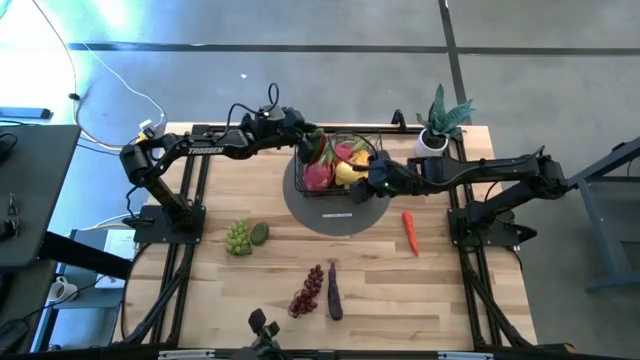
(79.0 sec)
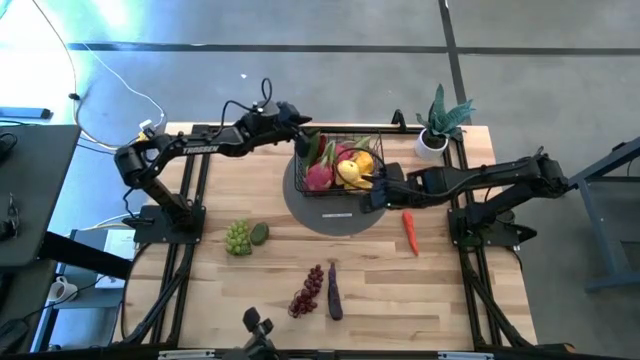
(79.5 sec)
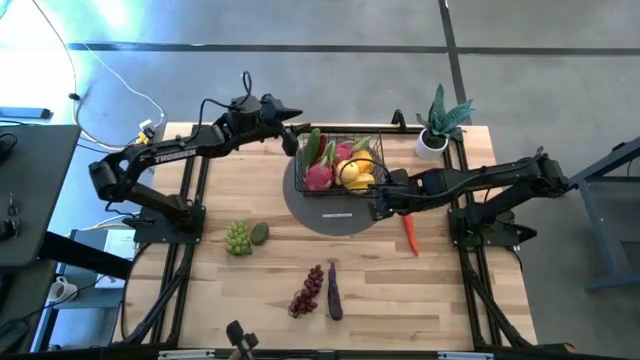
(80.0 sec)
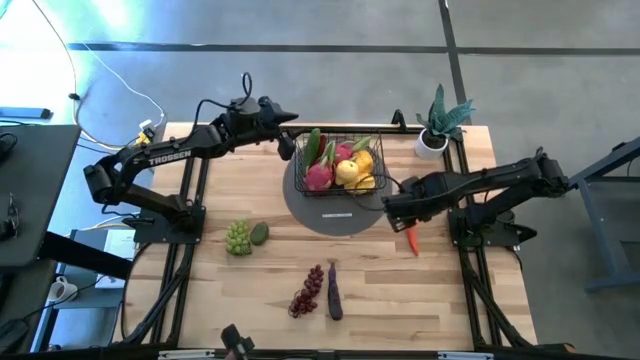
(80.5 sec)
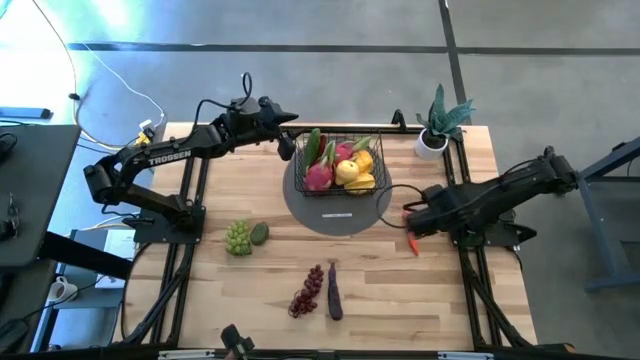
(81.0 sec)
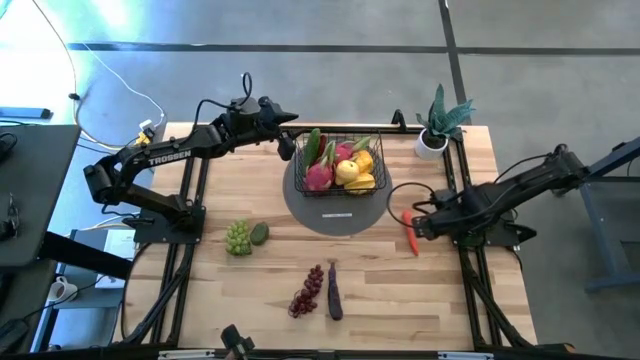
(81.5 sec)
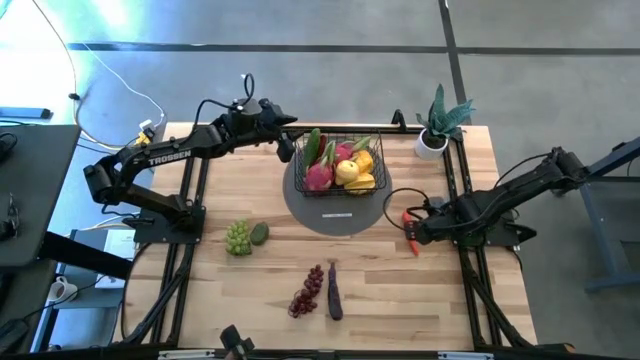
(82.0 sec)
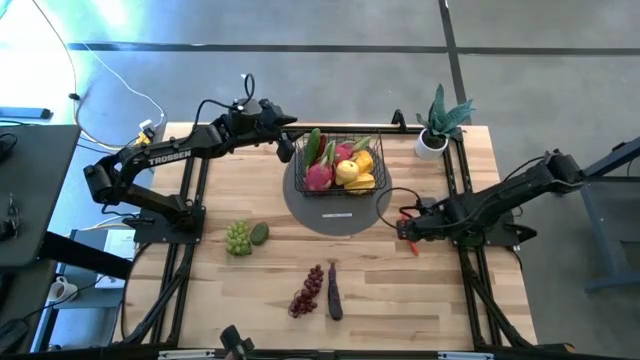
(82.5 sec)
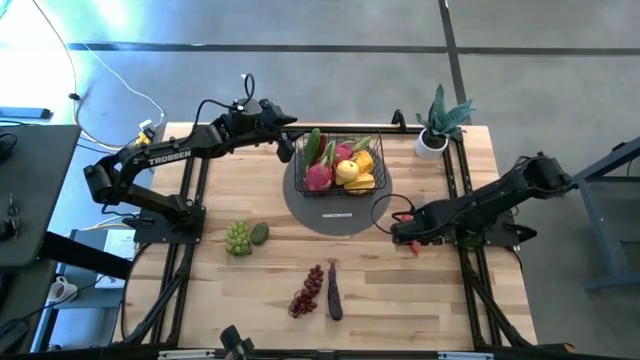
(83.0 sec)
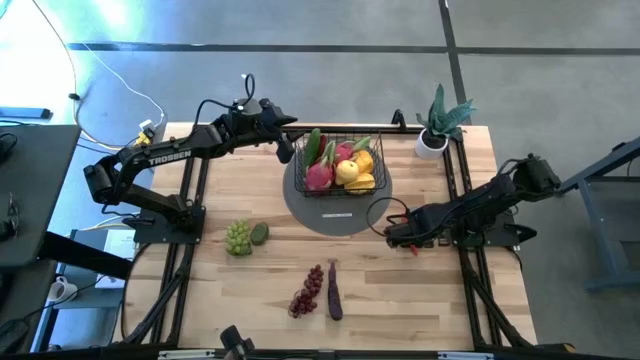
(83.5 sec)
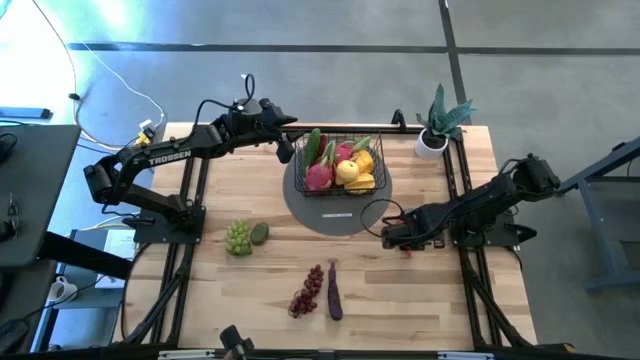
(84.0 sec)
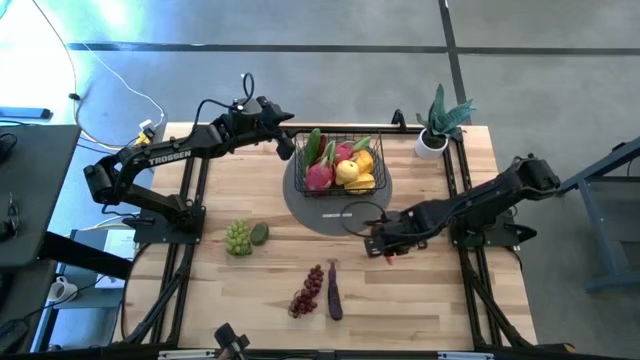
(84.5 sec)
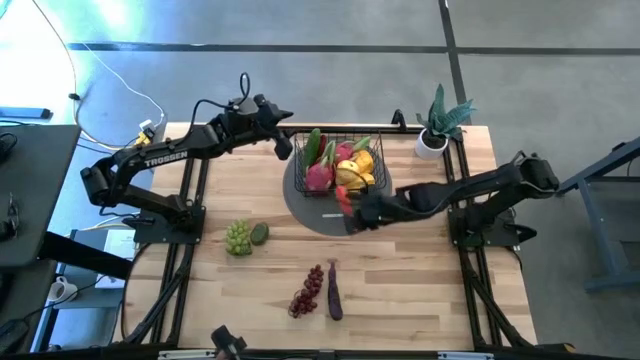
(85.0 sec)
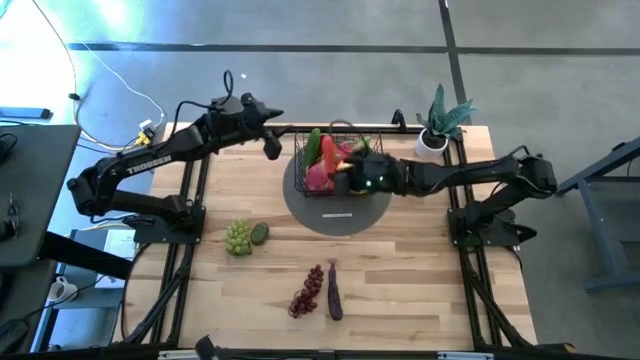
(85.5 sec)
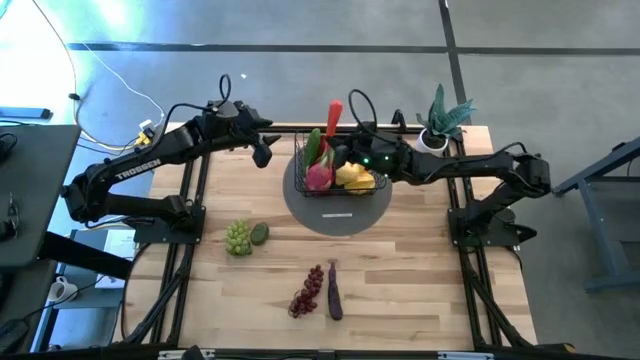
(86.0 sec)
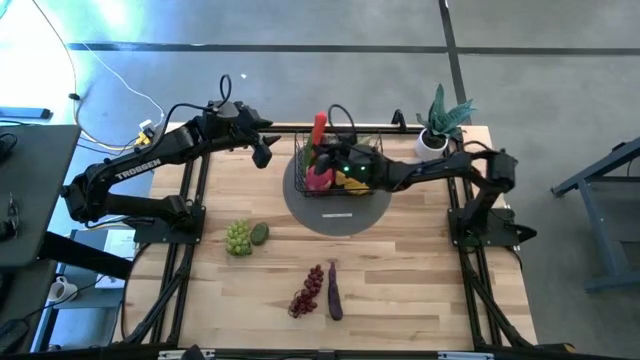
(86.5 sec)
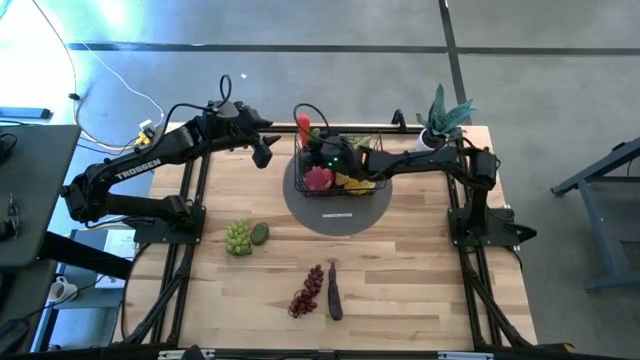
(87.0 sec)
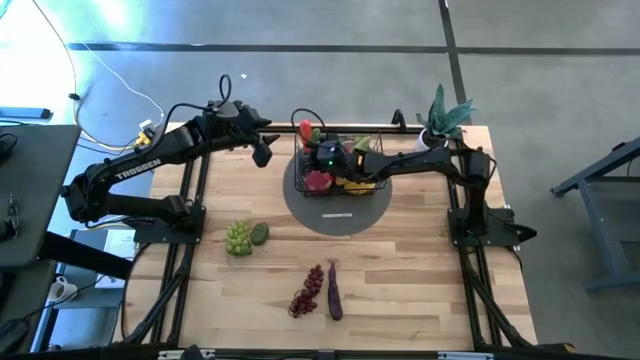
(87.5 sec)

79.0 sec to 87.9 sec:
Task: Build produce basket
Put the carrot into the wire basket

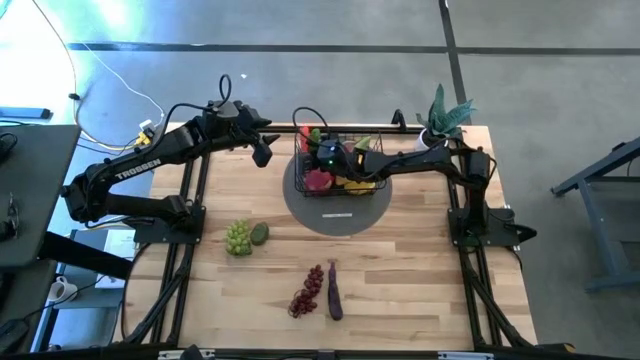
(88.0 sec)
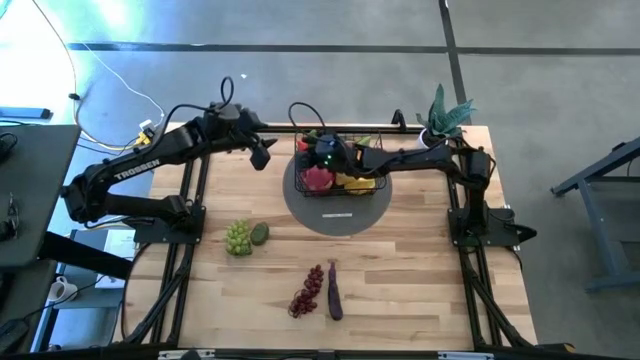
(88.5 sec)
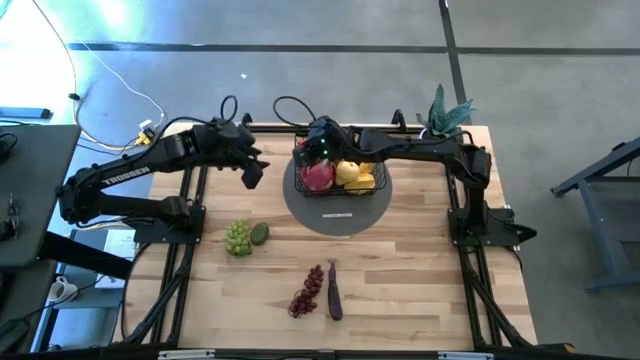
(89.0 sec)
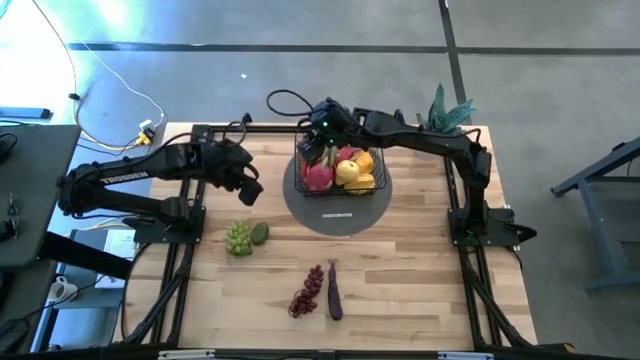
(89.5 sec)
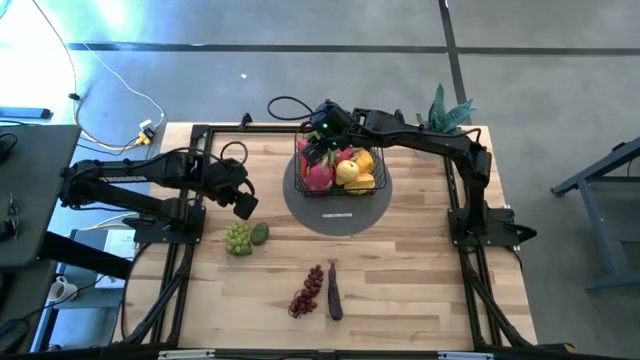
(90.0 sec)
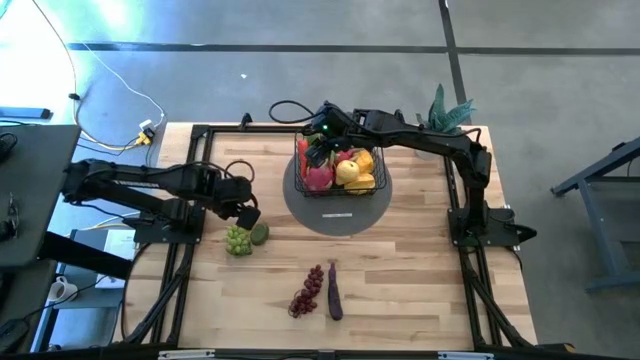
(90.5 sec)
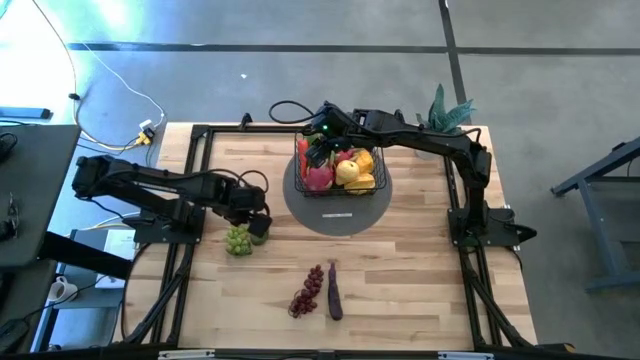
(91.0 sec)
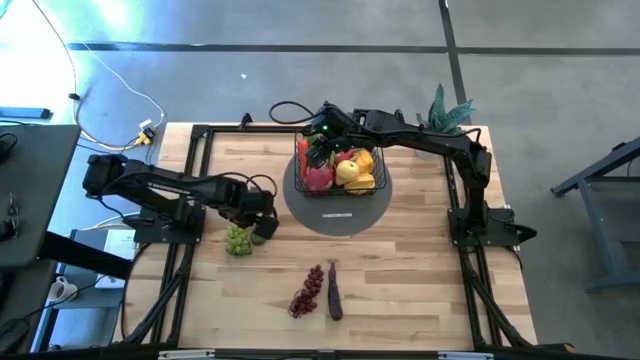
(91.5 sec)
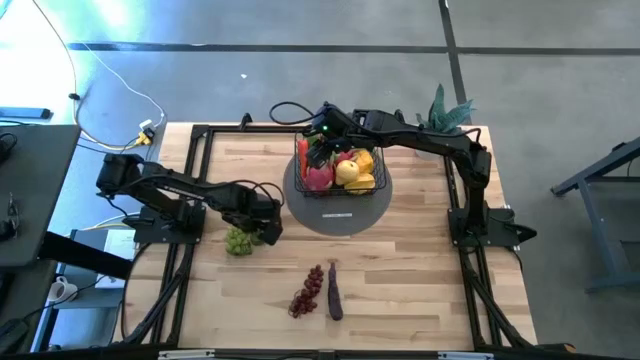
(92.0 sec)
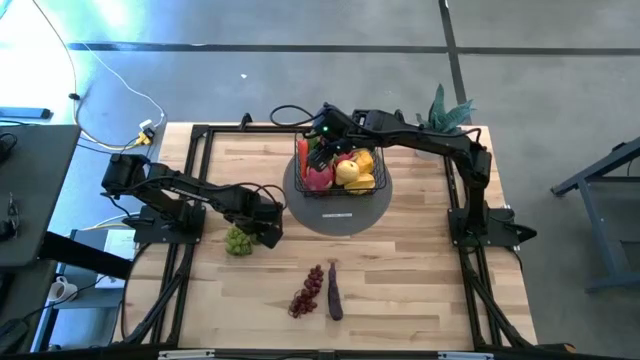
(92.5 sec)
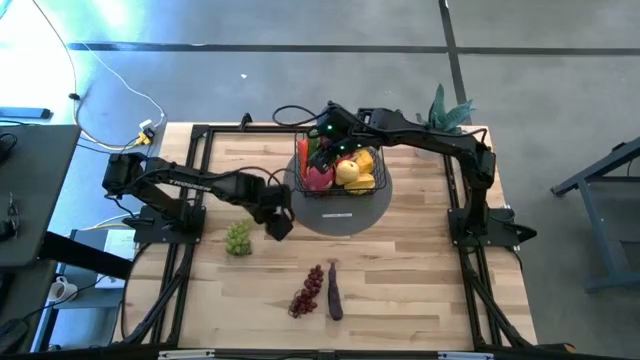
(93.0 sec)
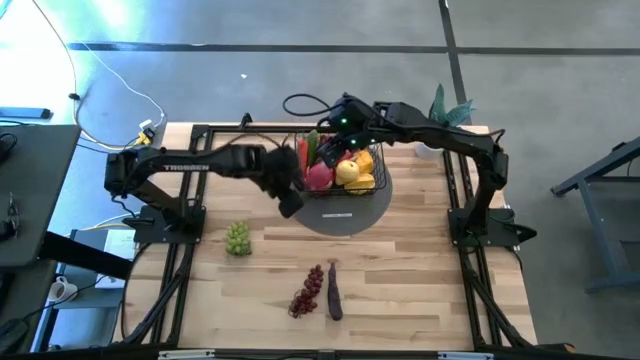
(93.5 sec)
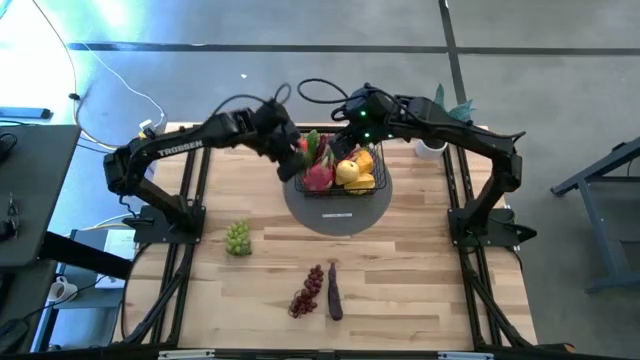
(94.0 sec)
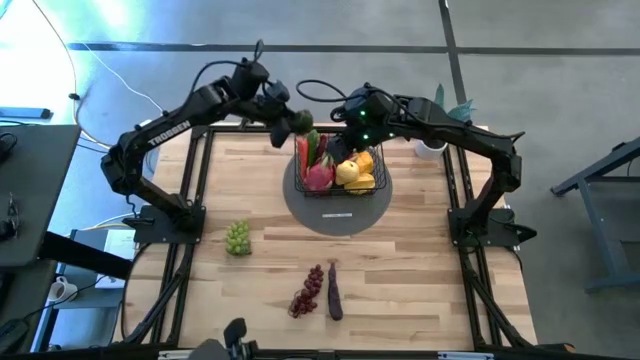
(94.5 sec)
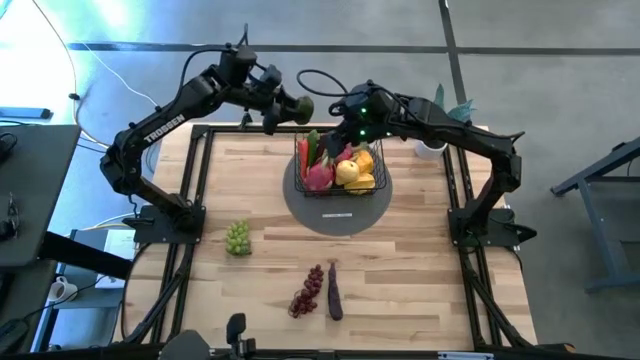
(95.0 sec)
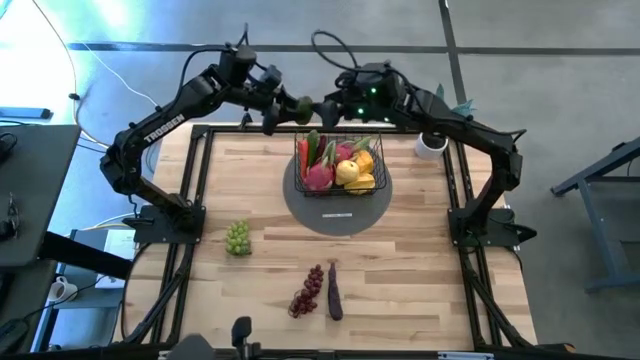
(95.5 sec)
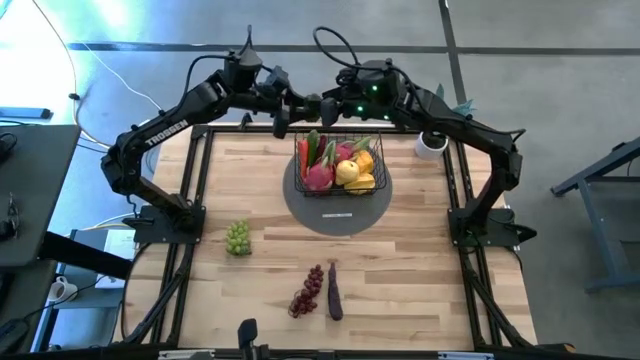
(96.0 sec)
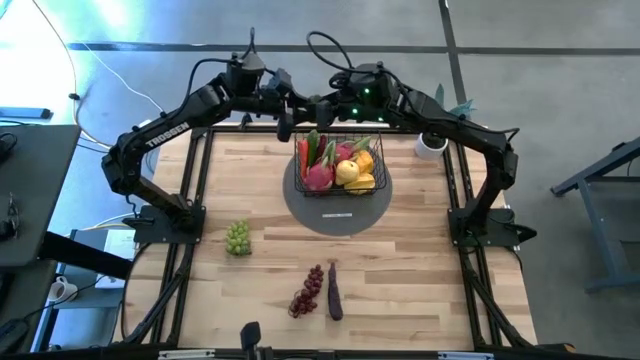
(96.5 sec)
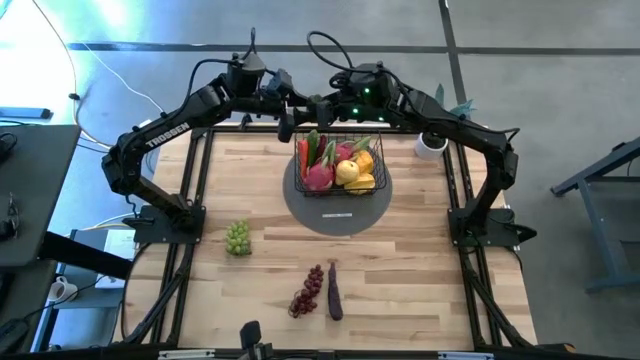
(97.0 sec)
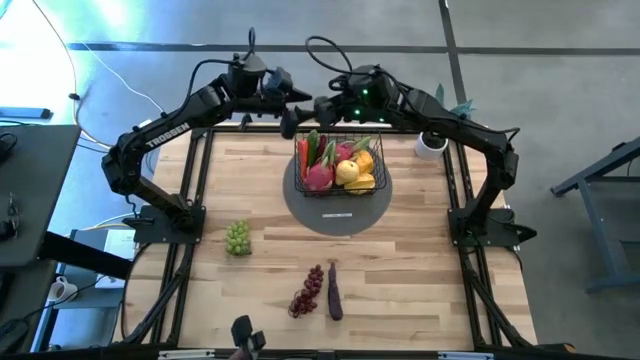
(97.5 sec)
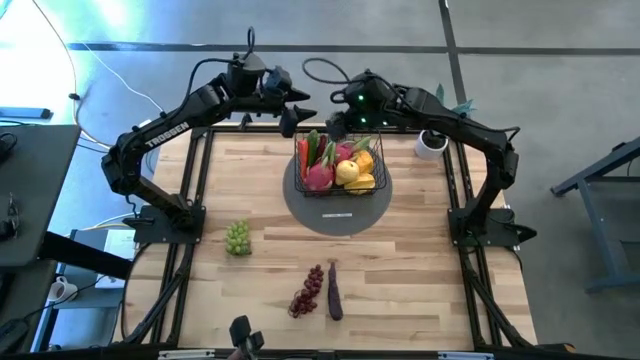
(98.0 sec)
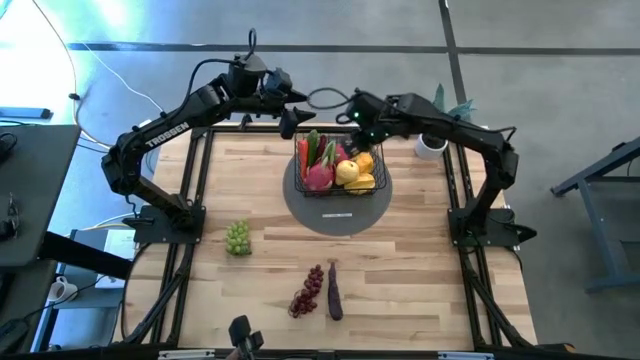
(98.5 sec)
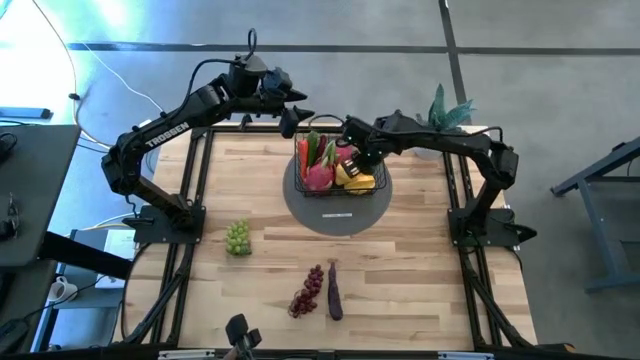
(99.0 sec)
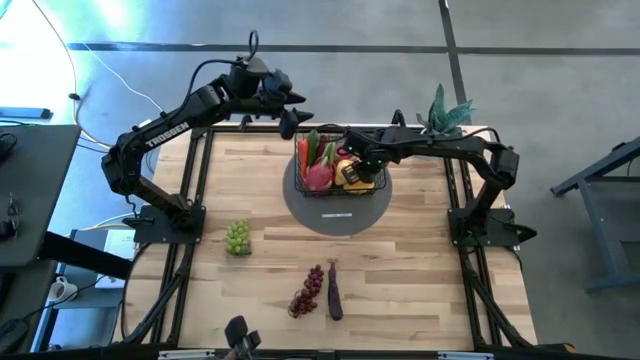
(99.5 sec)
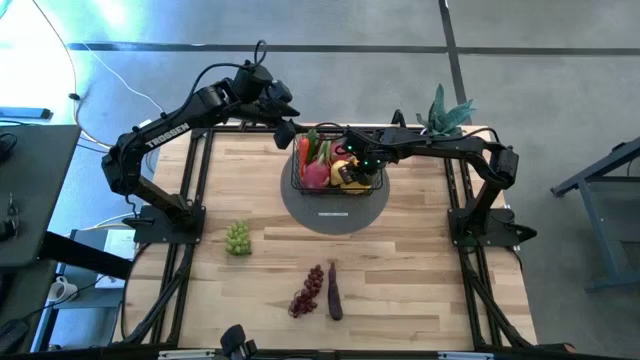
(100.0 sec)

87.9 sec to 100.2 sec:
Put the lime into the wire basket
